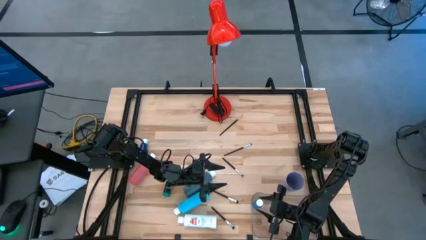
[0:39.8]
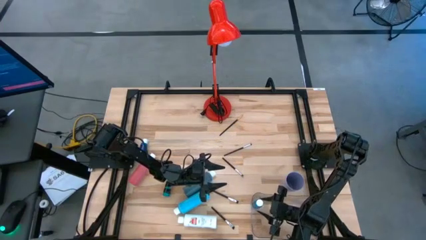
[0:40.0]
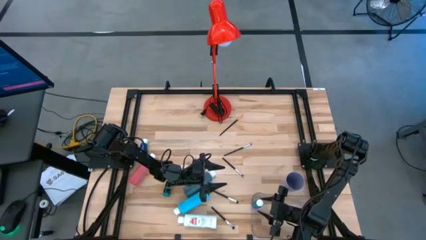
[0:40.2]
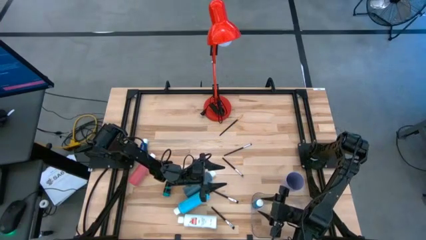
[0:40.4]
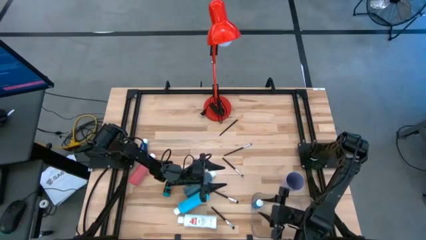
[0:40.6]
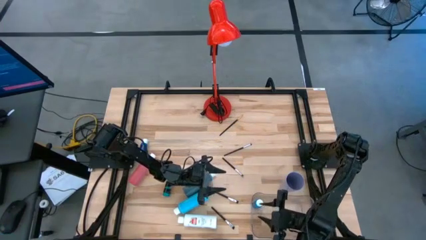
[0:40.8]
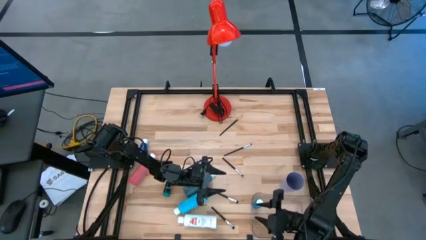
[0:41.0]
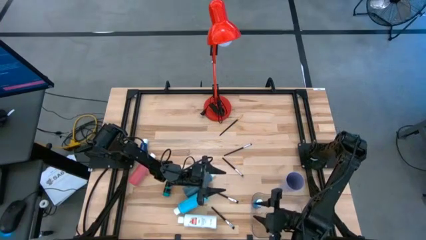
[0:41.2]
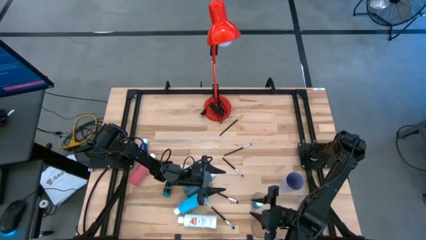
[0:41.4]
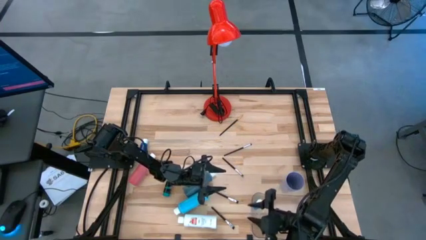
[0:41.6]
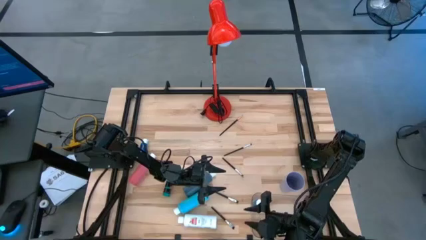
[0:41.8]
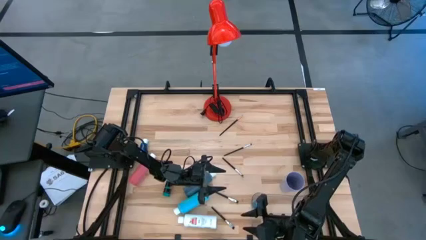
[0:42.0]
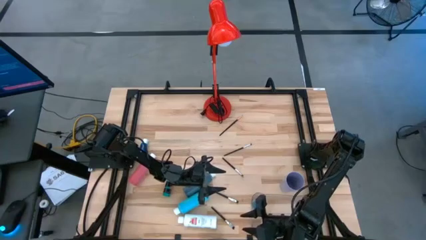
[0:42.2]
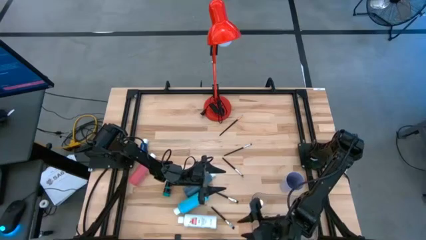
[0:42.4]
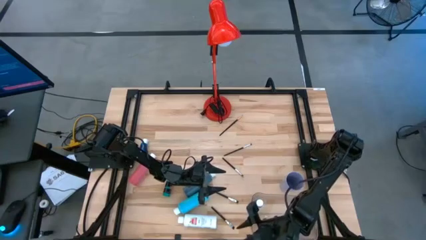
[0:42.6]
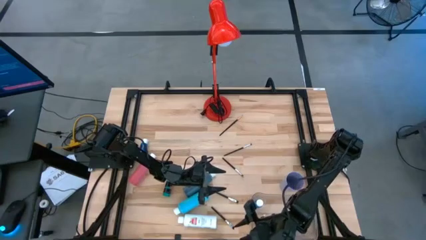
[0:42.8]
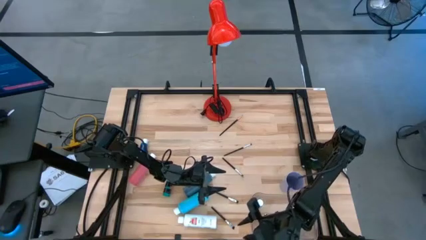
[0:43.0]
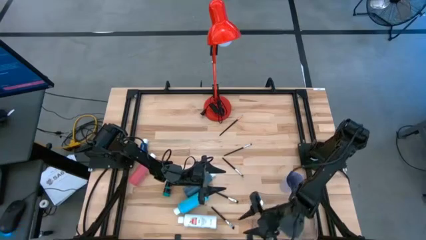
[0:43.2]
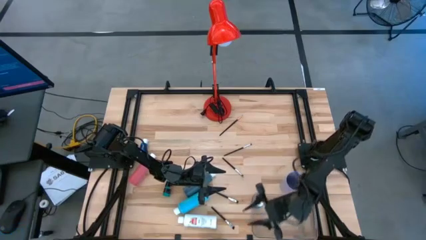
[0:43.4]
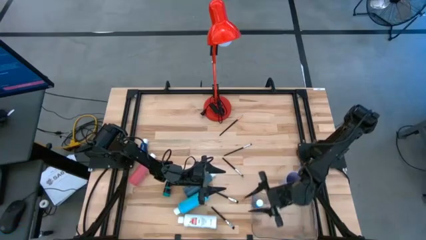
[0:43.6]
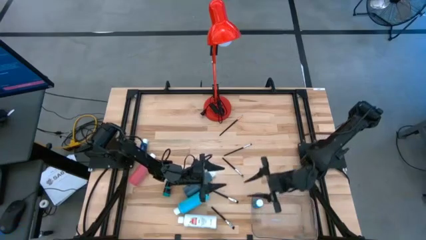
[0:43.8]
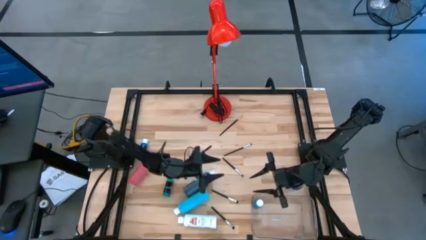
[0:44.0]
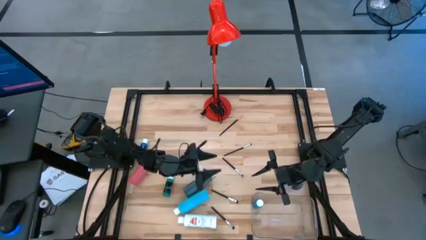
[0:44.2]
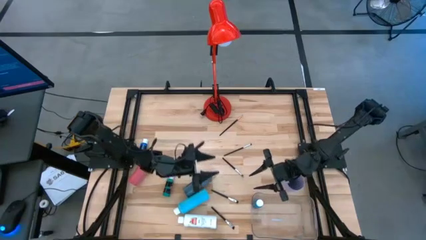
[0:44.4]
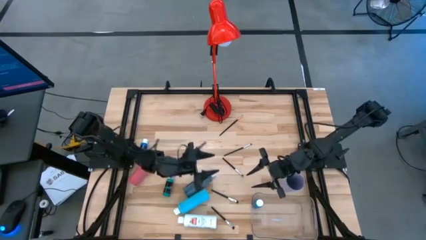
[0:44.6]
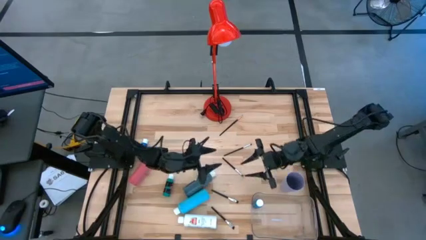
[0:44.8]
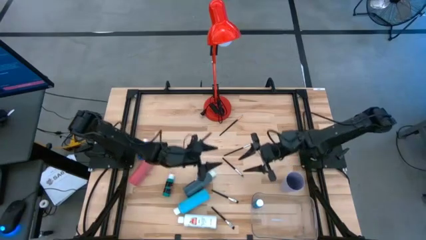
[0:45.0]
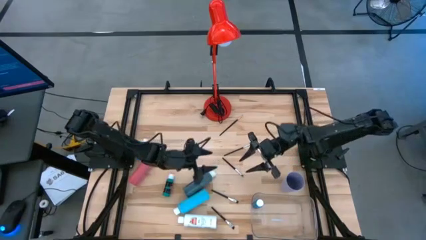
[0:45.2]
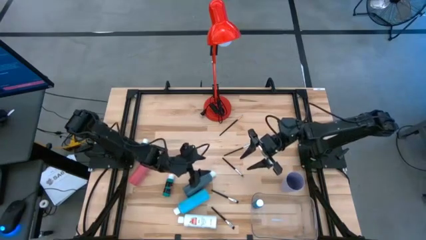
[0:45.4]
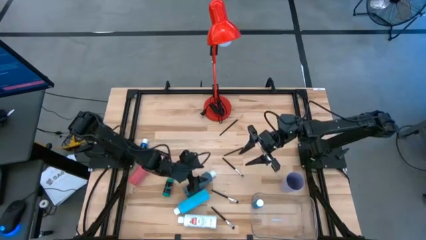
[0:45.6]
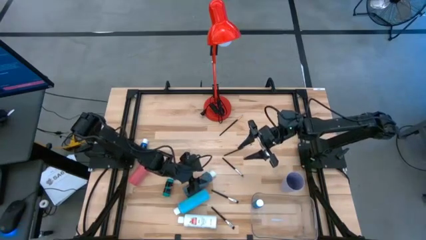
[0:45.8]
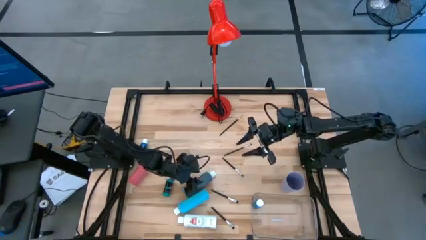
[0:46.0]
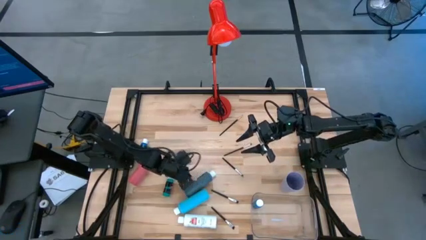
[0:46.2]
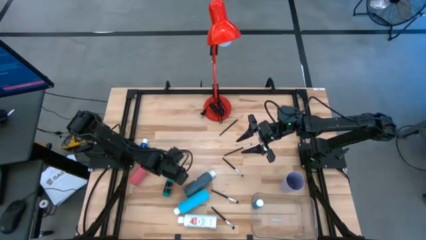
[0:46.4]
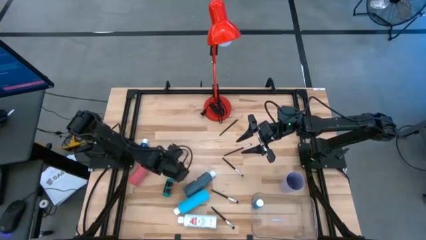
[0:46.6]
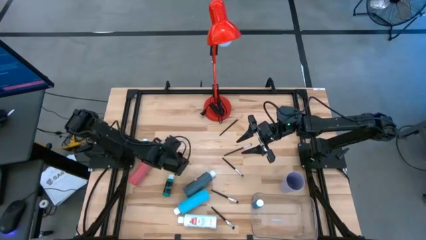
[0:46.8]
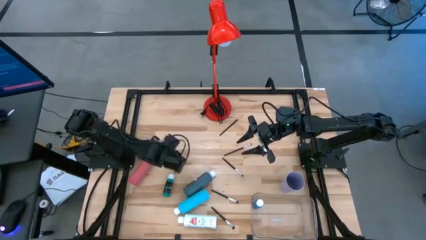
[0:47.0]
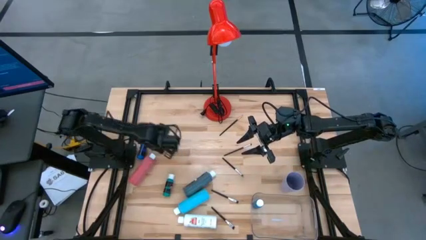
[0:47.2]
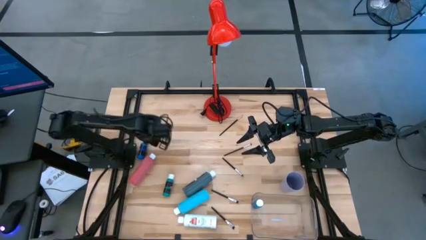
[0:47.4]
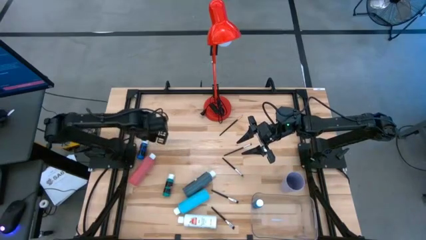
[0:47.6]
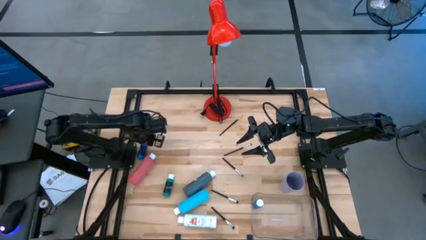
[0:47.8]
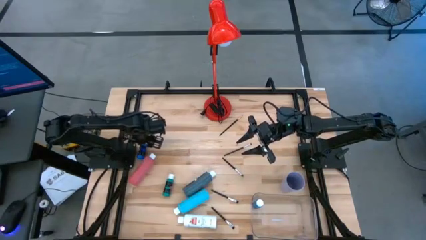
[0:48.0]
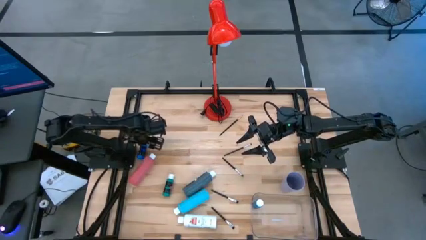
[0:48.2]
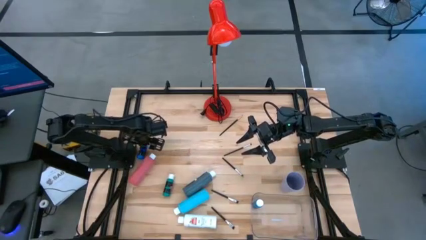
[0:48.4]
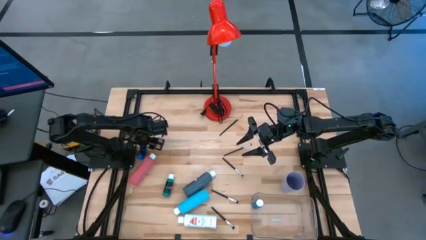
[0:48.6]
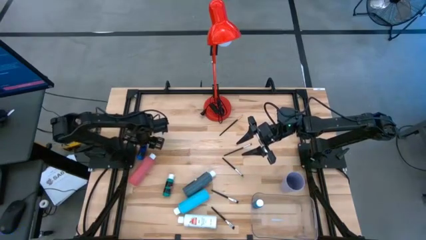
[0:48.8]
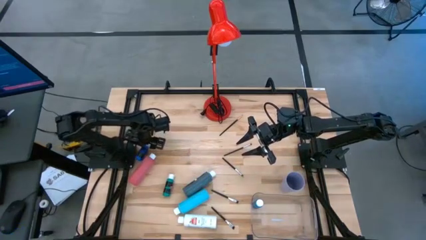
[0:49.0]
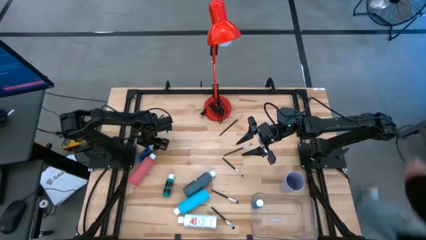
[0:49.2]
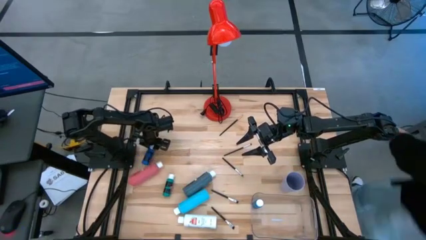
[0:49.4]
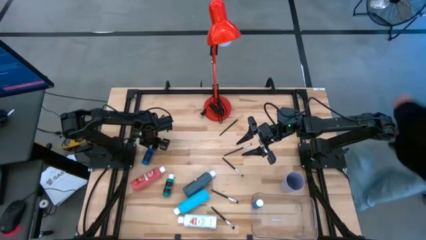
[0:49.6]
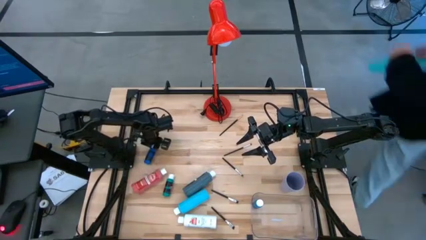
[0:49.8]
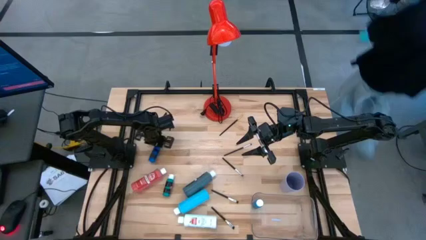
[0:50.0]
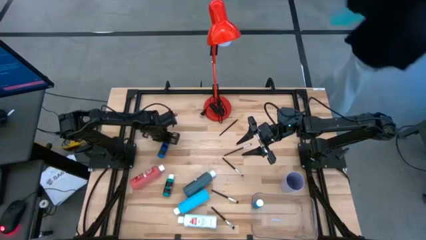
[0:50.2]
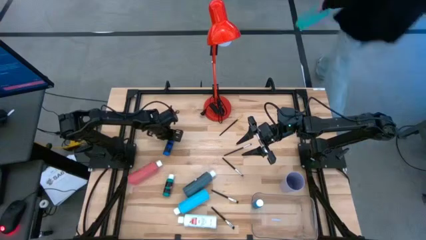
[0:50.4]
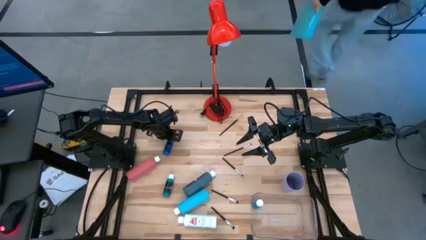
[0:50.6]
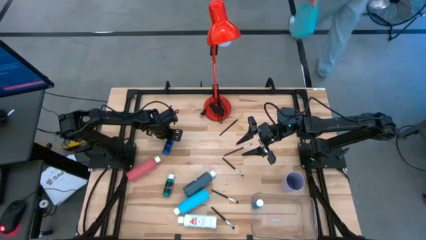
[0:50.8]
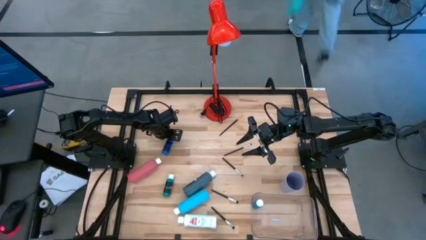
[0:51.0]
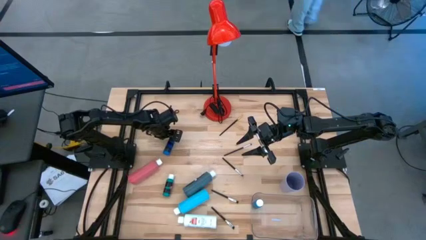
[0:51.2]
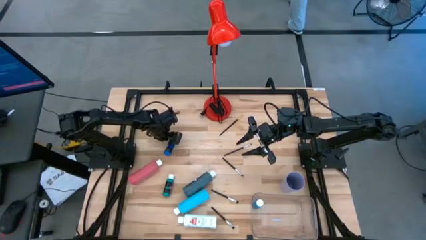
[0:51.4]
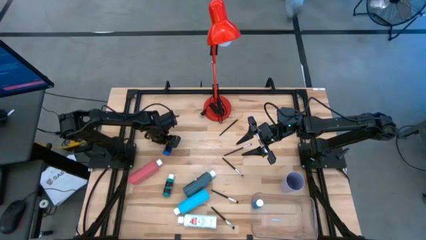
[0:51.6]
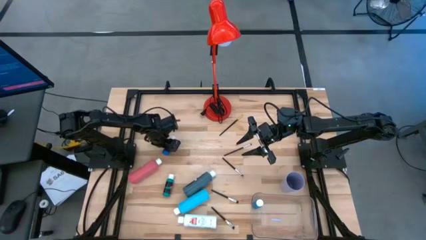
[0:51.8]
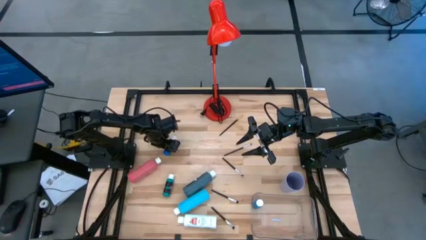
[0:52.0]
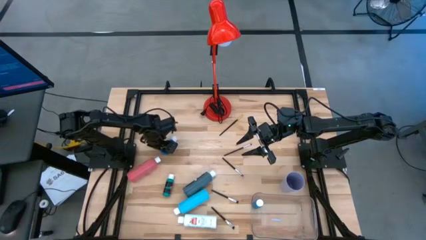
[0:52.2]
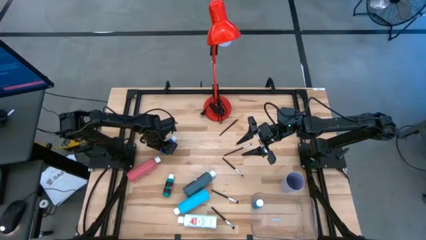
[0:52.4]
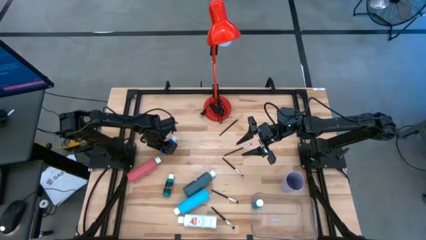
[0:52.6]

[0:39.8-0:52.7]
Task: Pick & Place Paint Supplies
Put the dark blue paint bottle into the transparent bin

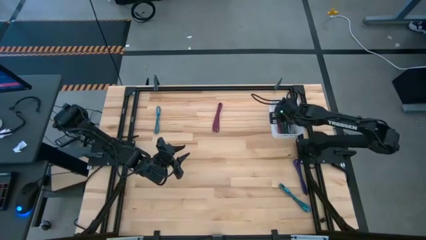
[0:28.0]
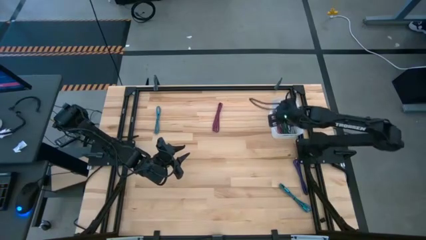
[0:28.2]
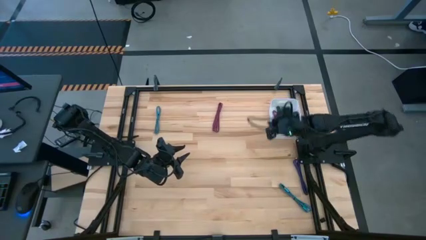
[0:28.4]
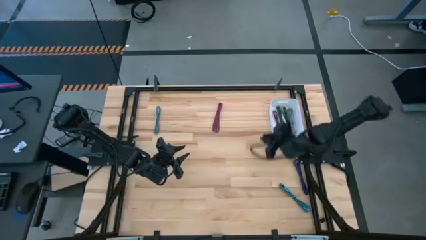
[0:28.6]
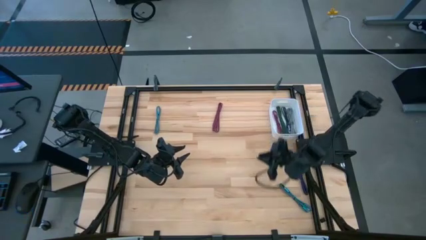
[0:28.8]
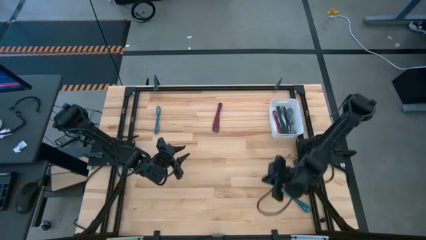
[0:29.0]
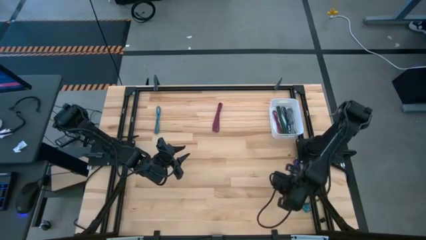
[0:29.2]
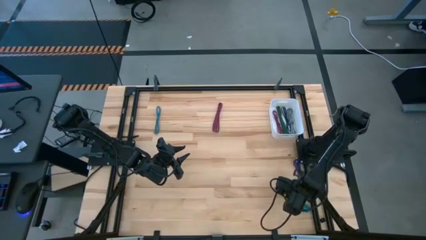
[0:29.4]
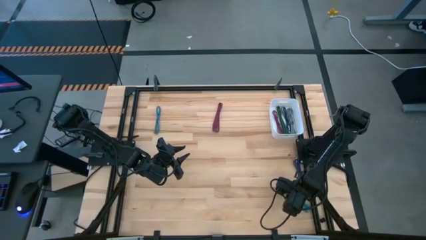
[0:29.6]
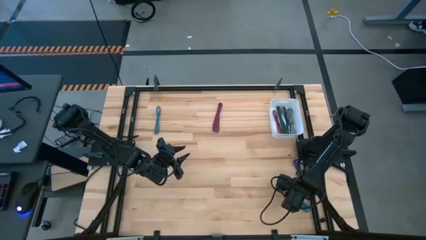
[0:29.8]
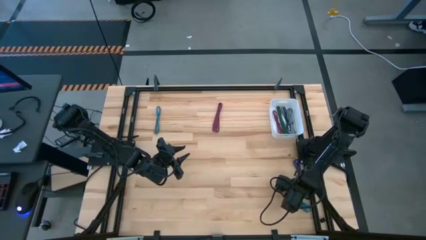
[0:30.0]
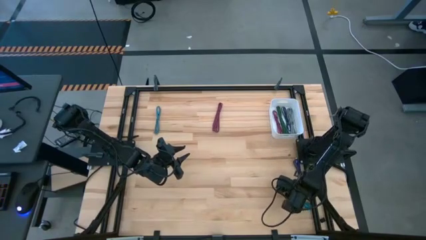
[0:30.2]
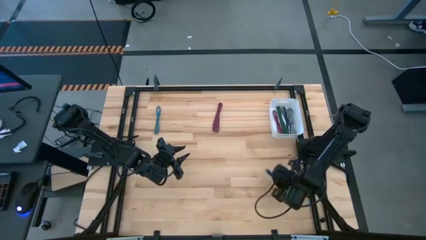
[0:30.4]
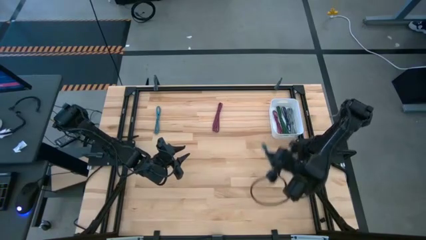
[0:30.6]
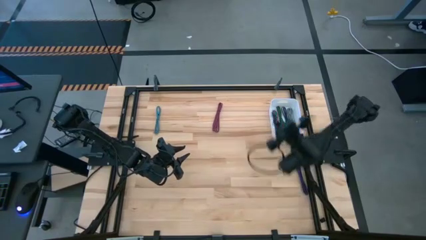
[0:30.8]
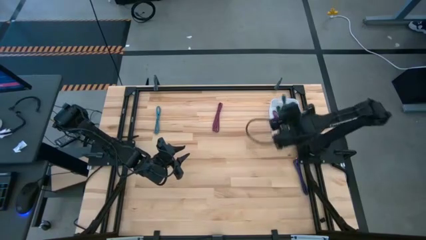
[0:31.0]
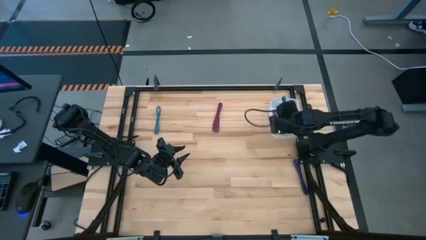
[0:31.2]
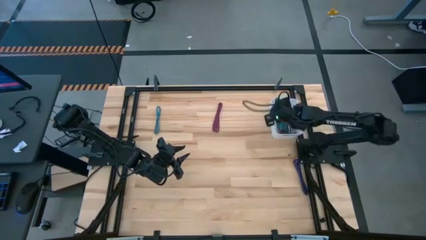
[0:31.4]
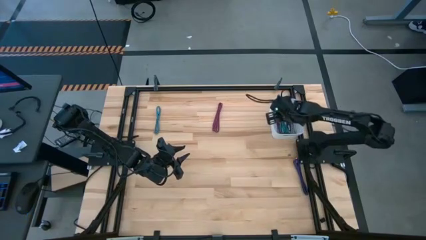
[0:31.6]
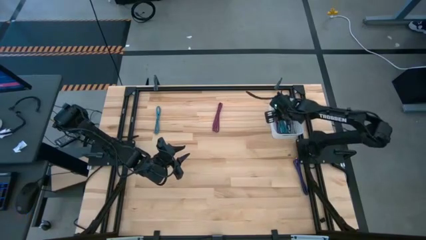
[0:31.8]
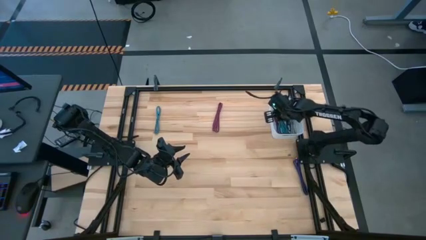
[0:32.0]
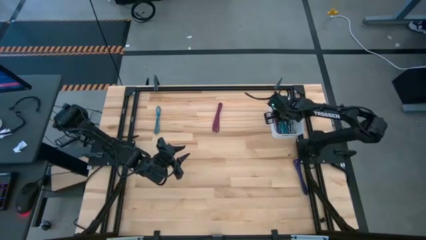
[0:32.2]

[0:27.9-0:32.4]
Task: Pick and place USB-C Cables
Put the bottom blue charger cable into the white bin
